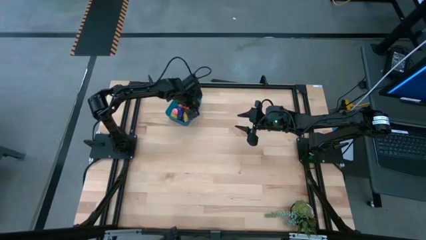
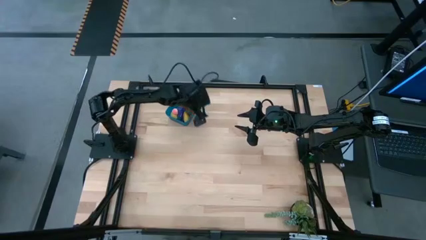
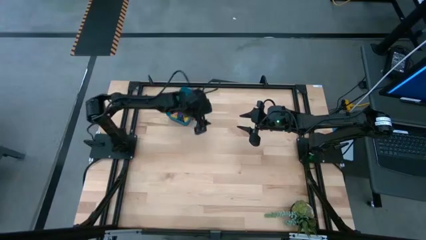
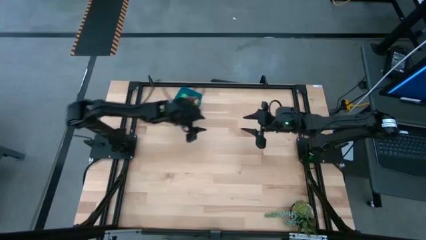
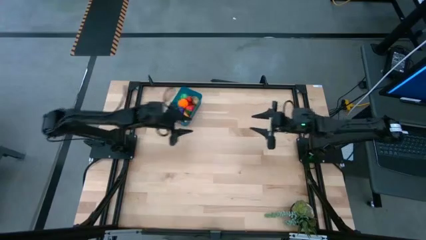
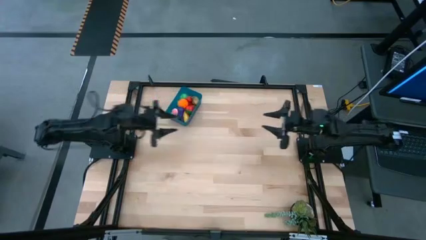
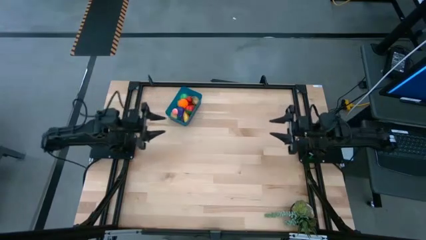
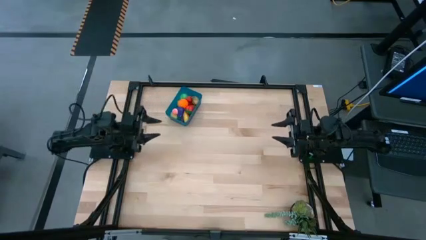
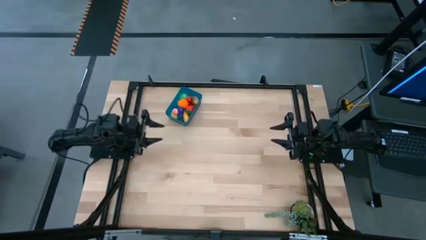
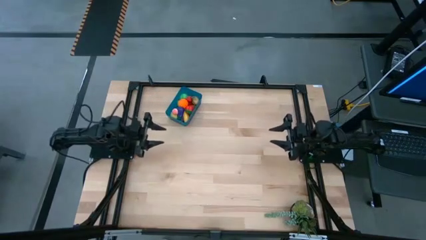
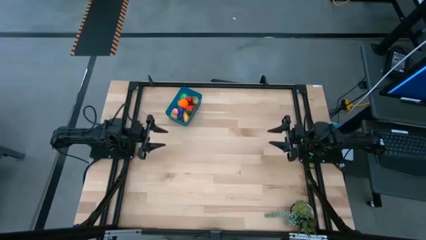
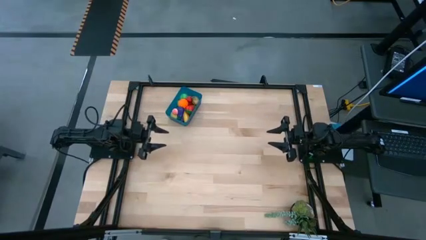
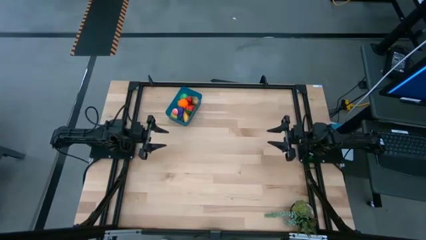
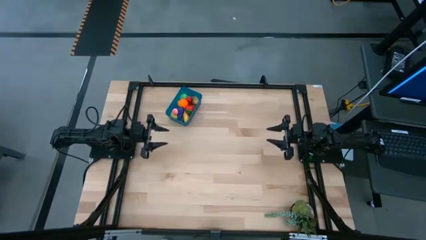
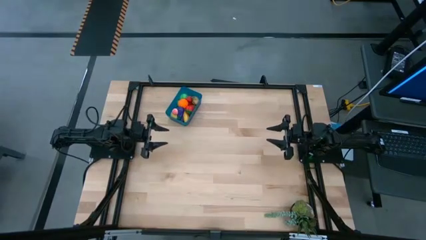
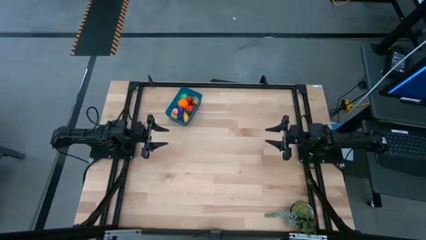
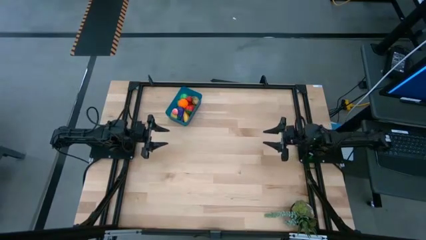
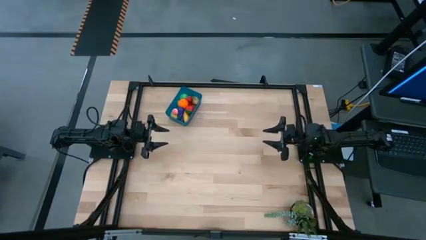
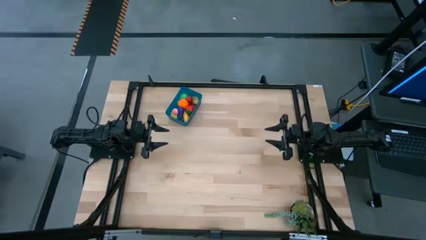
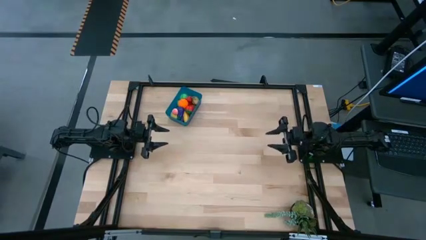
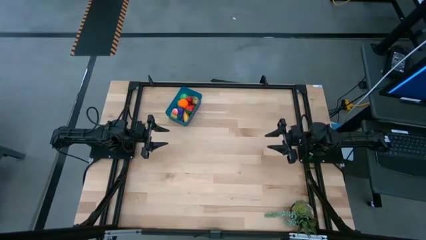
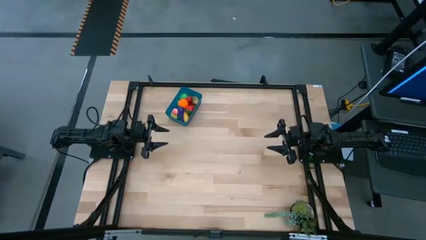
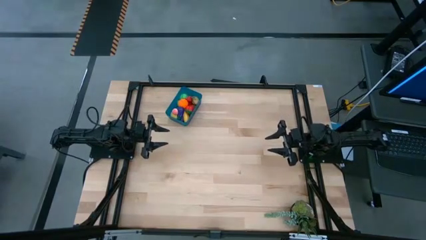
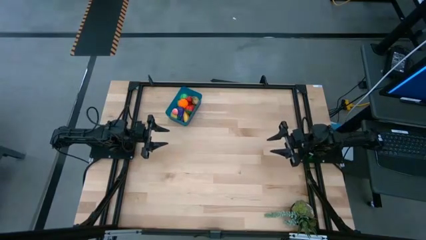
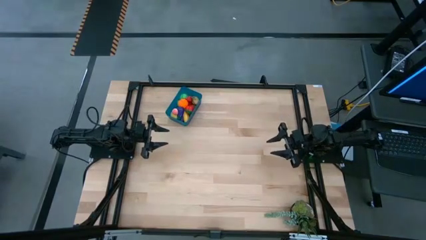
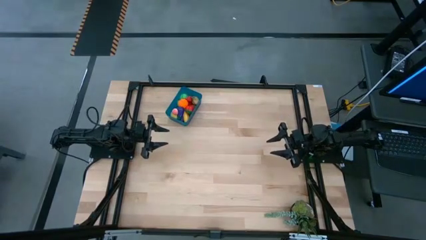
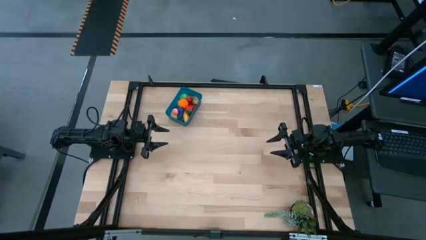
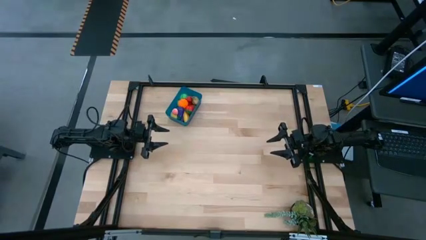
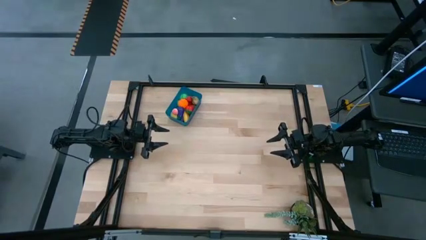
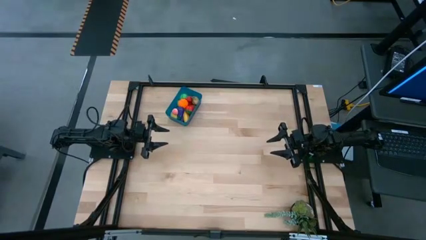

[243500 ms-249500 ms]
Task: Pick and placing Produce into tupperware
Return to Home Position

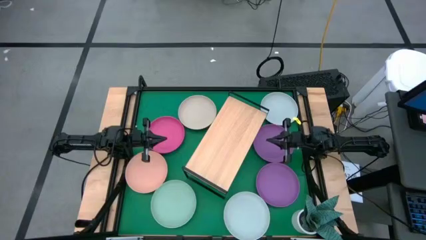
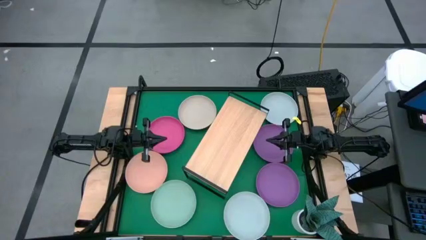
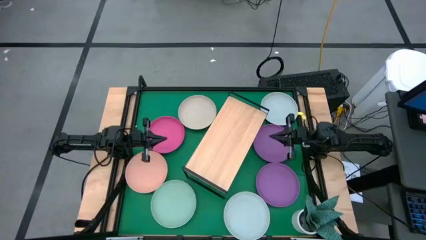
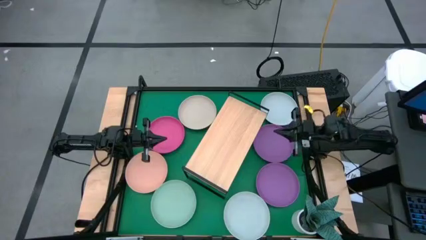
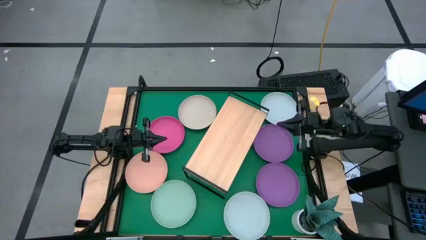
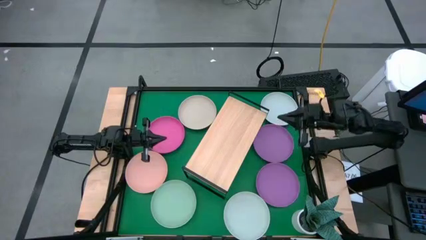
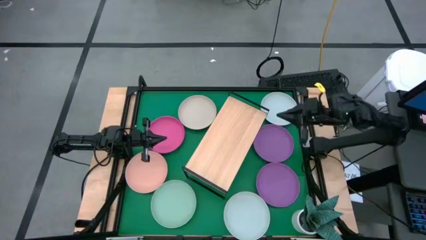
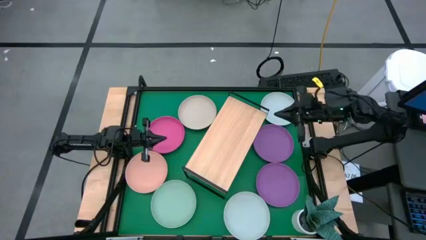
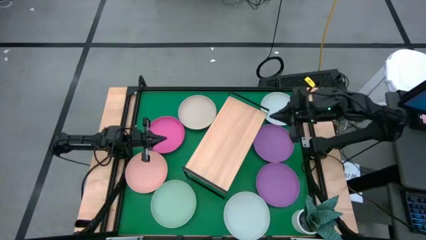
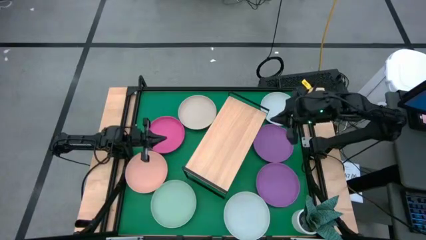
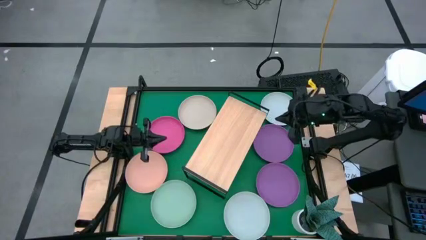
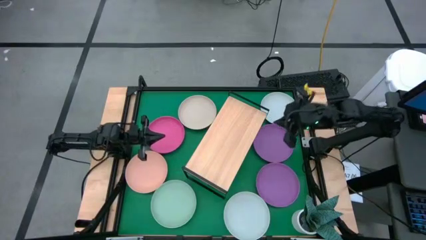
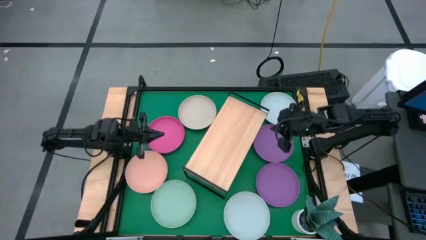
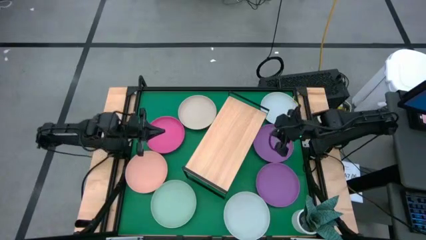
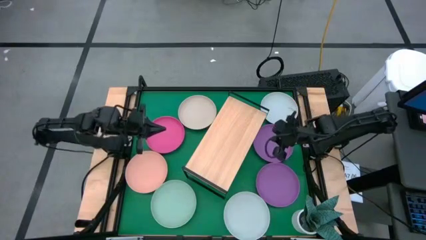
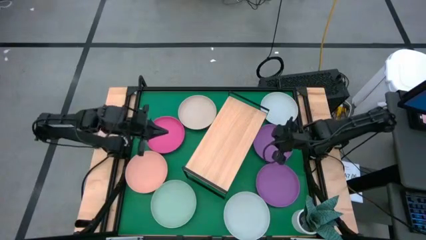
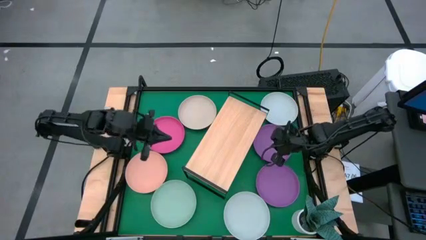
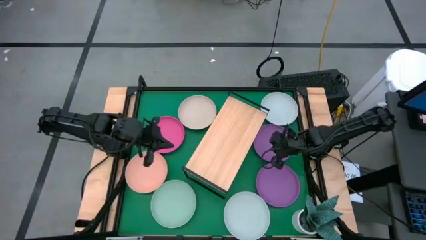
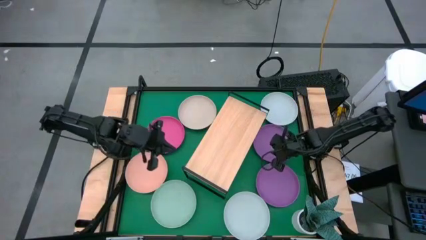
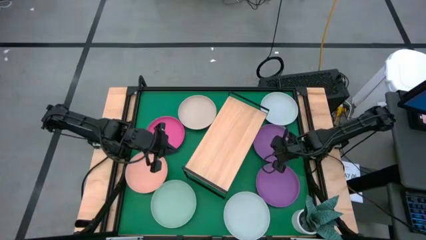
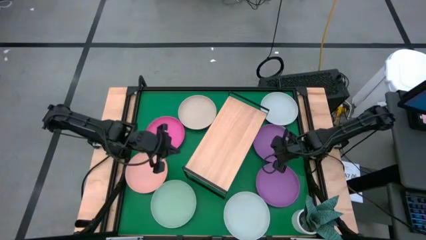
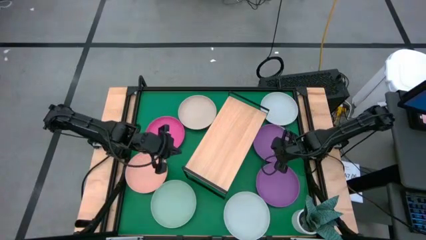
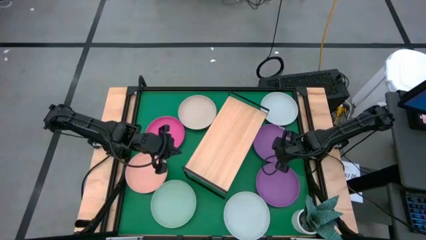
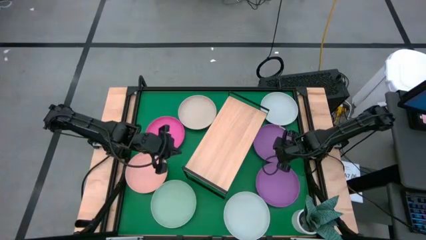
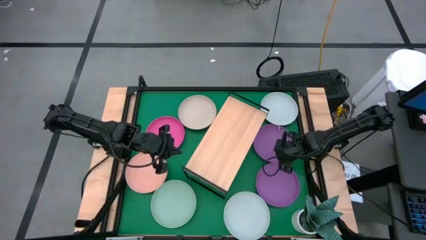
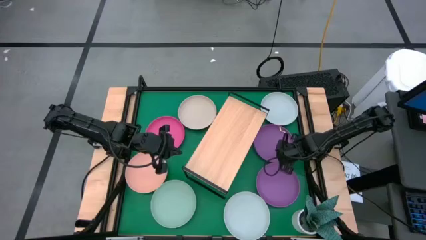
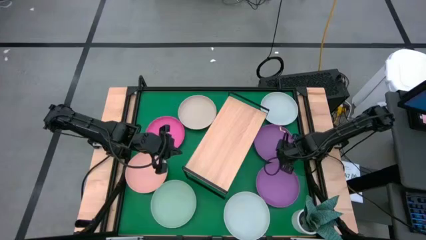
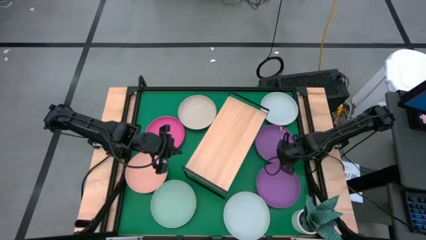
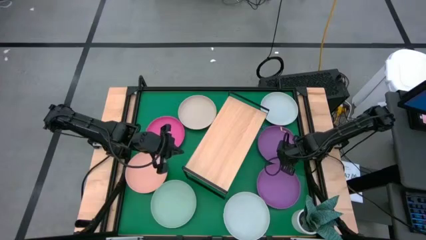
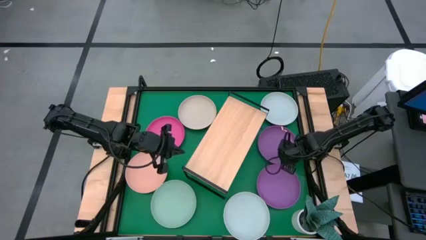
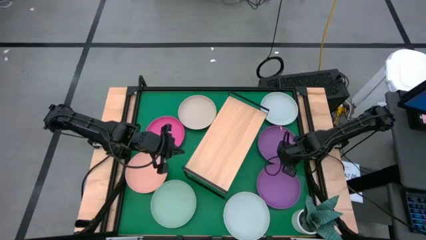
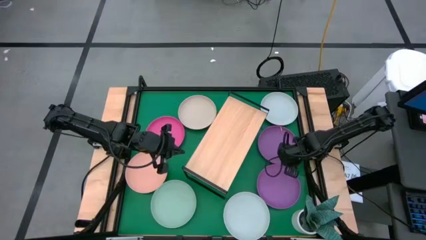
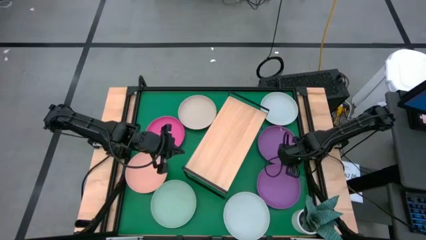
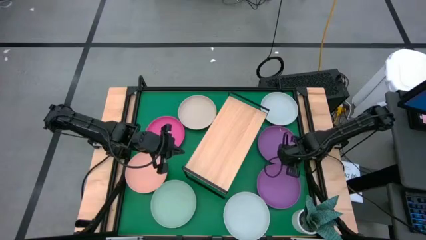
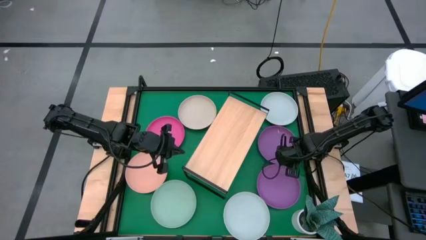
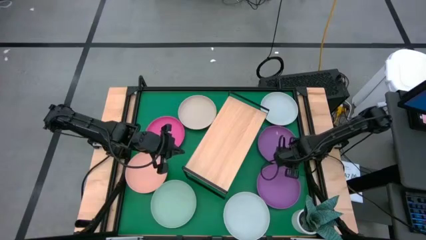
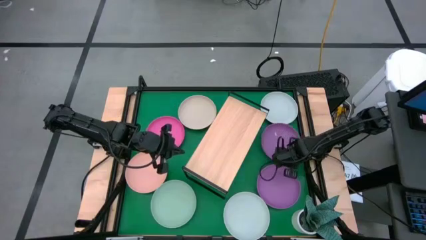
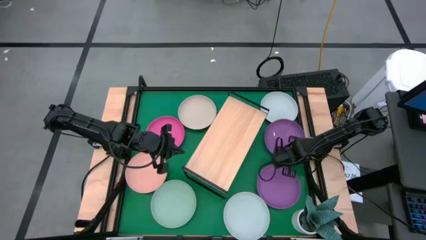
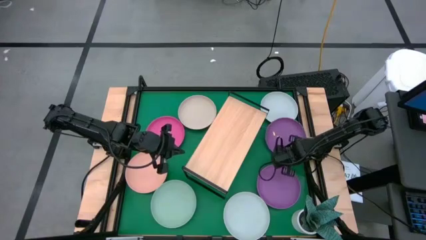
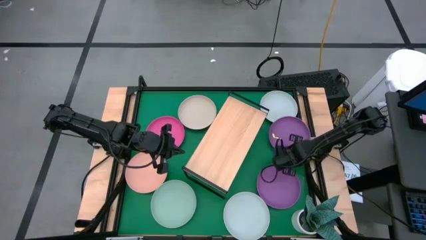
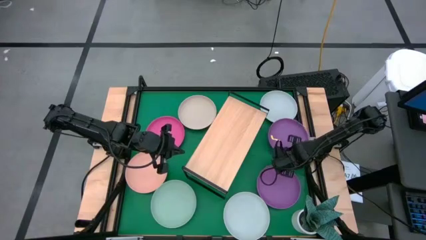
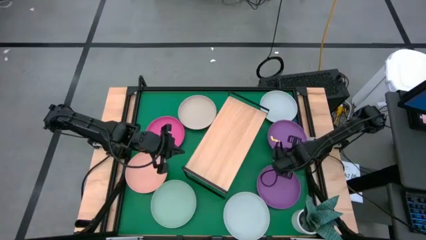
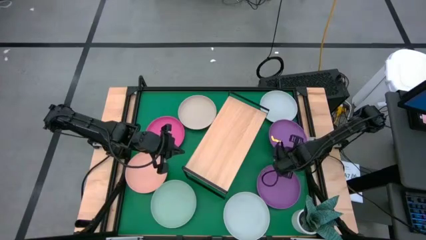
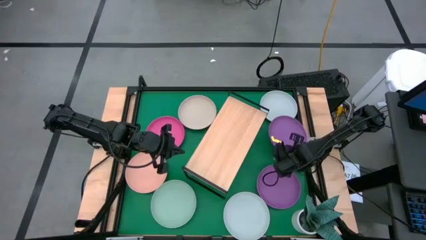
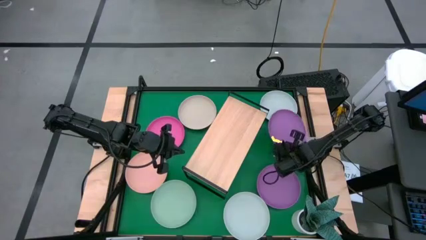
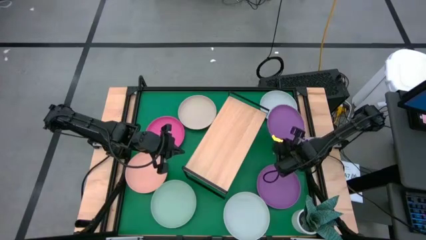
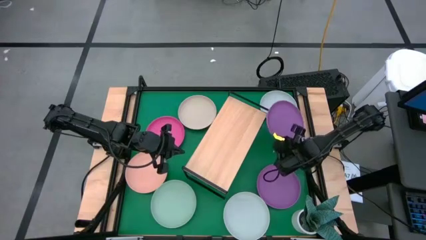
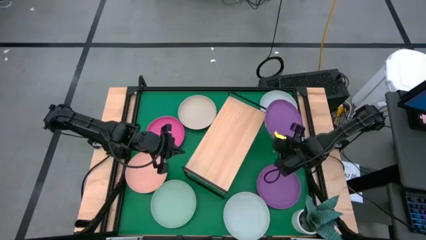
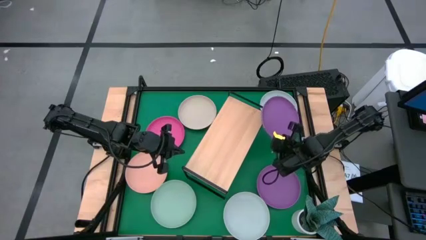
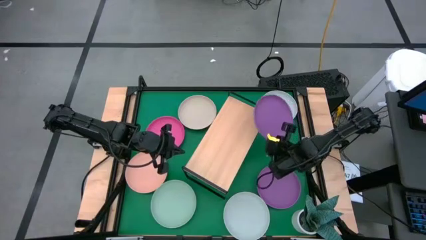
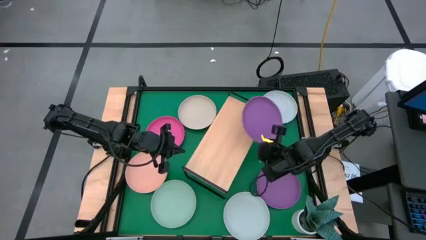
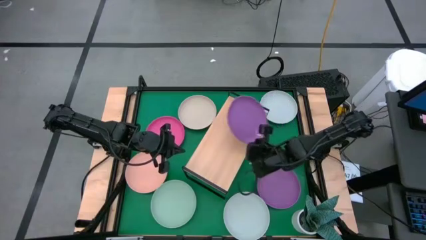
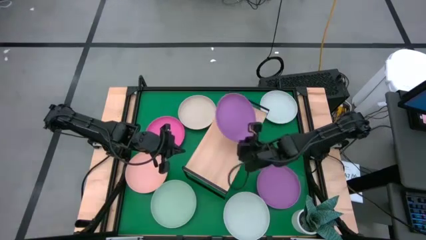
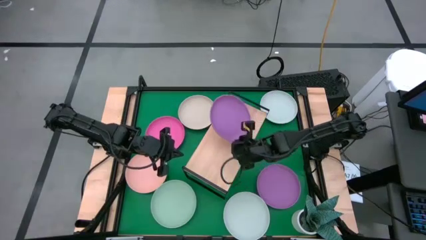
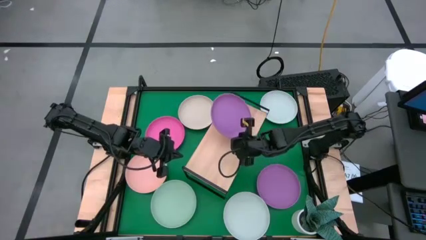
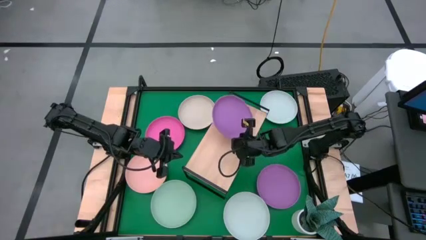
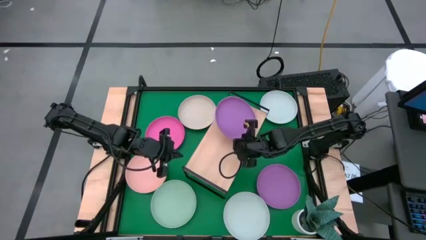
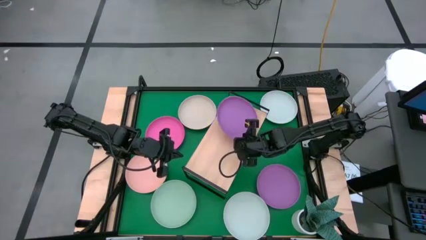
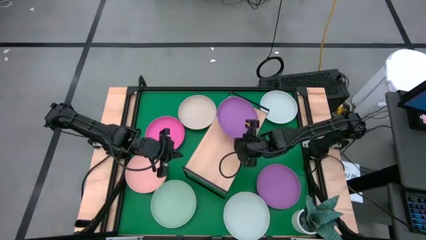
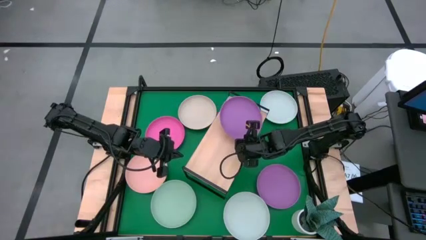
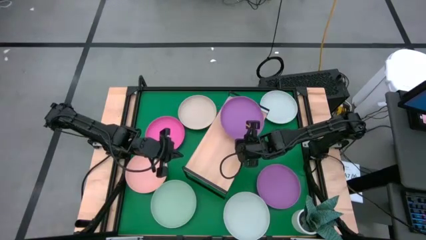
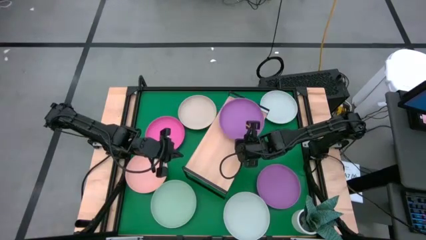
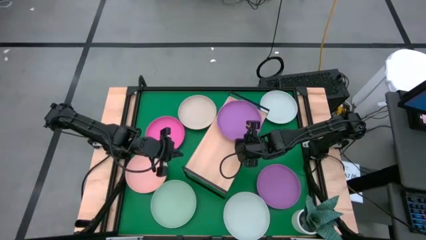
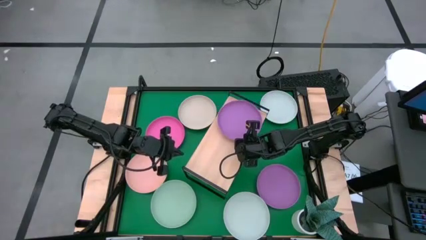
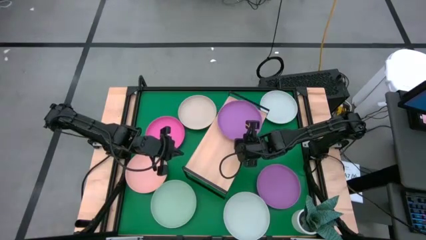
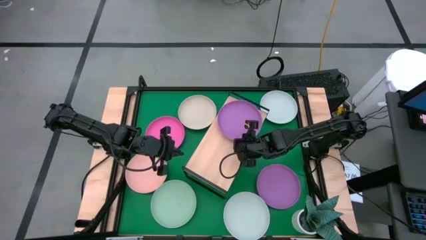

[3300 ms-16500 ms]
Task: Place and stack plates onto a shelf
Put the top purple plate on the shelf
